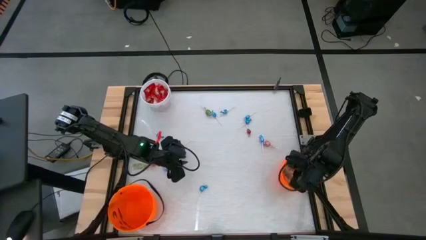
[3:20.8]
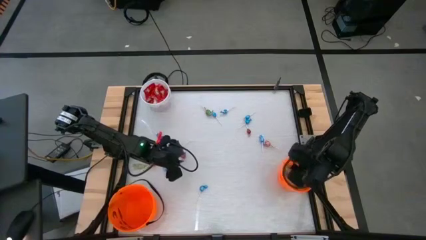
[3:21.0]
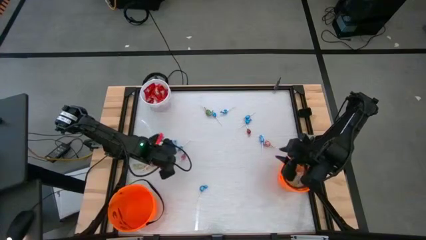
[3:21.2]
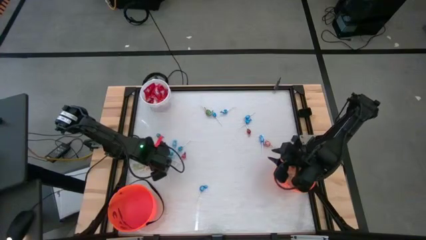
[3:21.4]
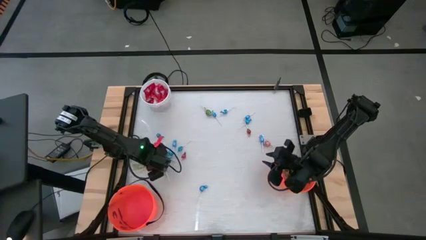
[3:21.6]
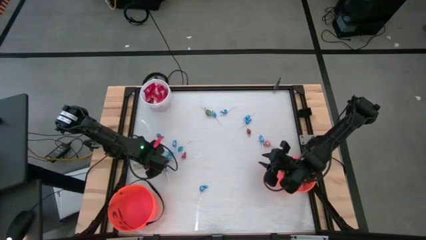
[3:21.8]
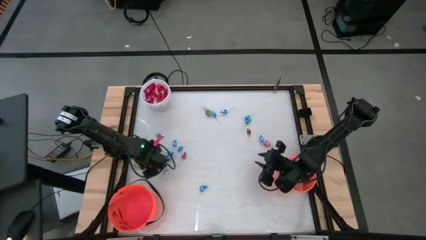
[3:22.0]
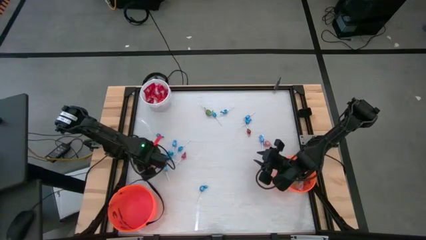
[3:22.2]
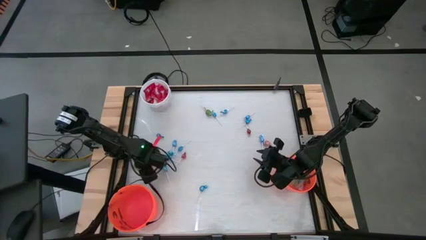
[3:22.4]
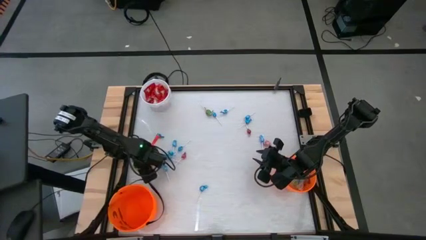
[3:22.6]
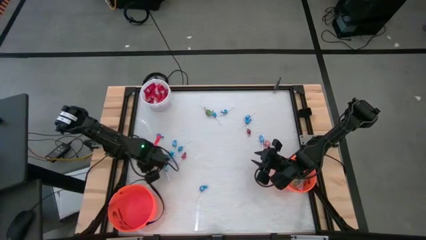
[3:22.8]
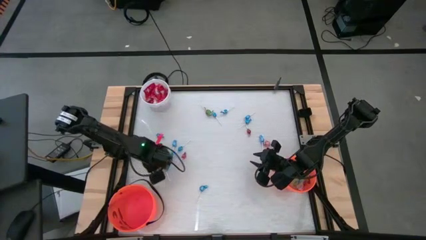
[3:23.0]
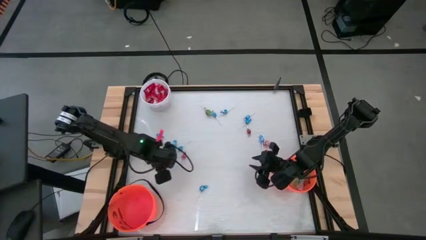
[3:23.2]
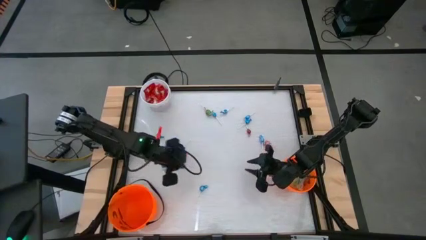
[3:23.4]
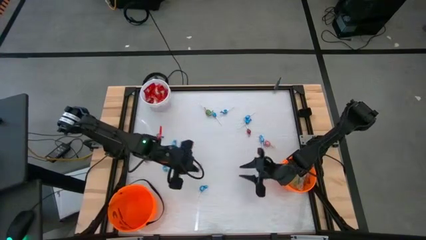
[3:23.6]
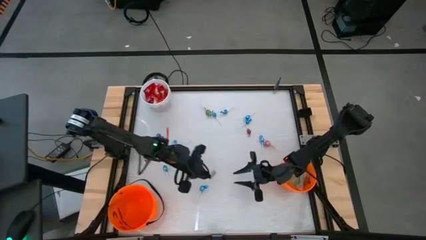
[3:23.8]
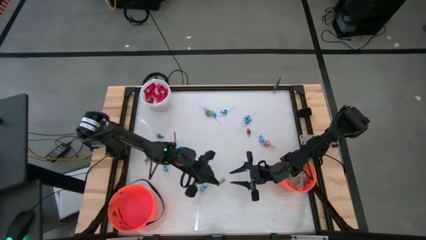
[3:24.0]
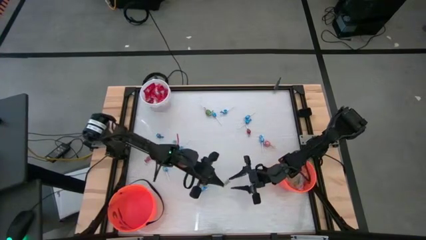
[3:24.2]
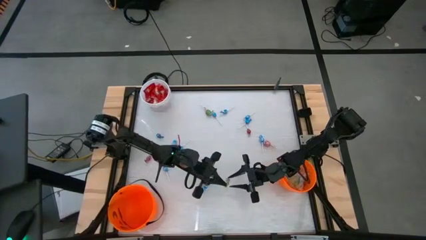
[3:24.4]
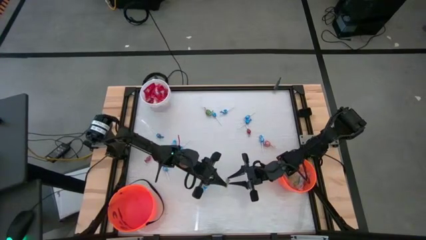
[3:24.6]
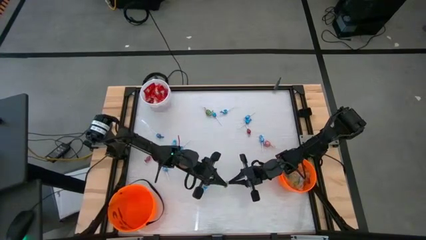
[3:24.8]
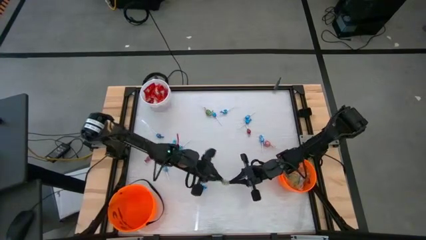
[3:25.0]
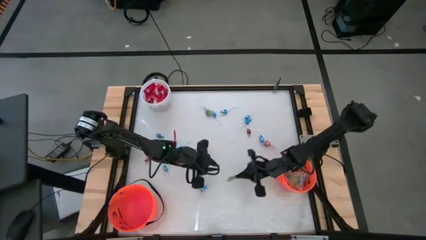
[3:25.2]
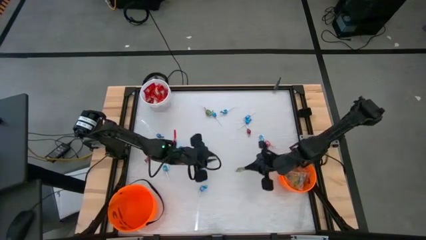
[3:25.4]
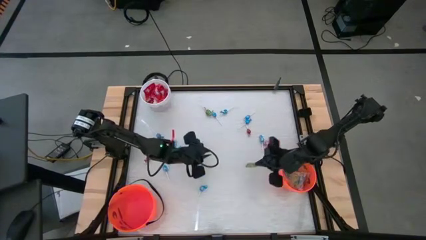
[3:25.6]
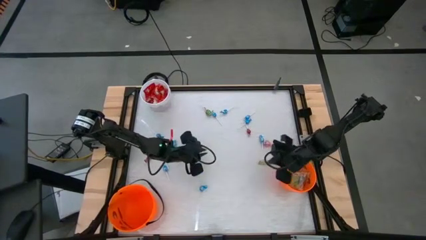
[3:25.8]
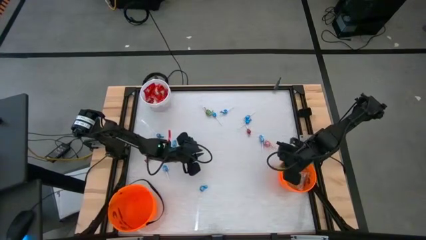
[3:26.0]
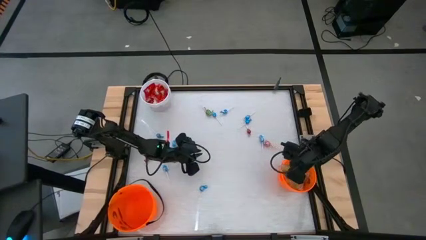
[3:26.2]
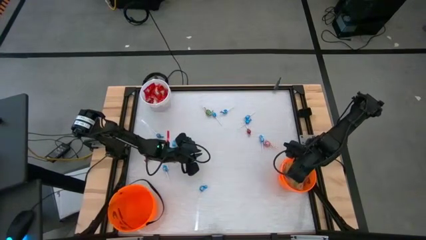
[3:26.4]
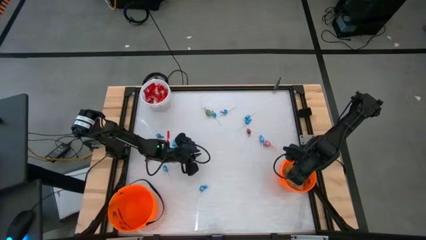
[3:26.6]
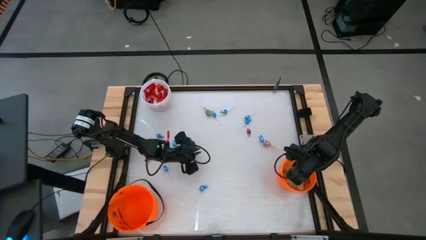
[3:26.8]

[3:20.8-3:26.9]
Task: Sort candy by brand, put in halloween buckets
Put the green candy into the right orange bucket

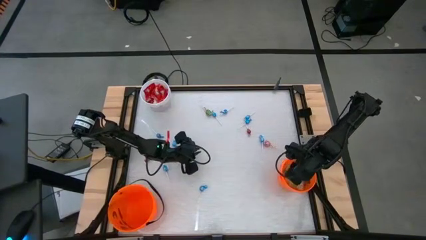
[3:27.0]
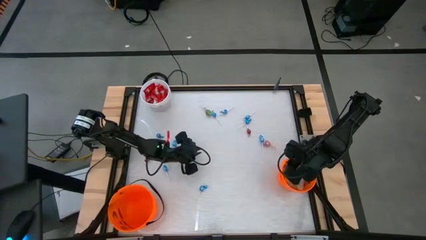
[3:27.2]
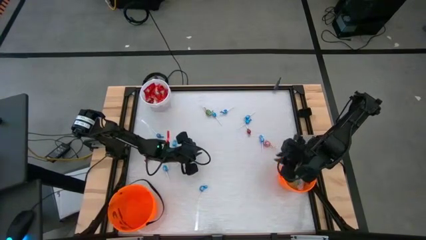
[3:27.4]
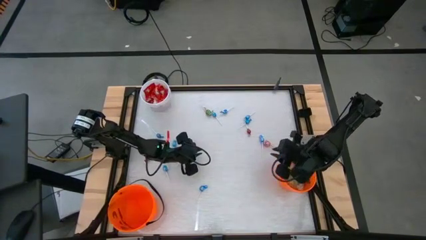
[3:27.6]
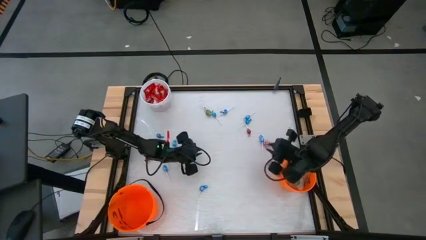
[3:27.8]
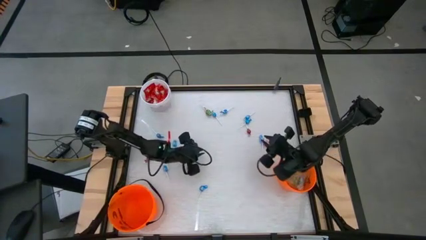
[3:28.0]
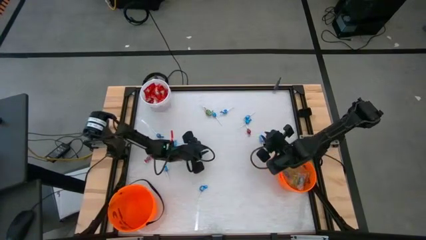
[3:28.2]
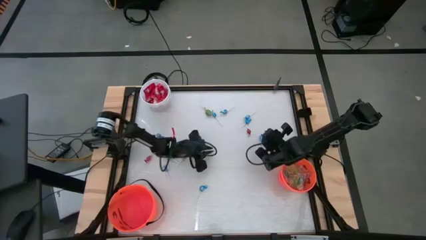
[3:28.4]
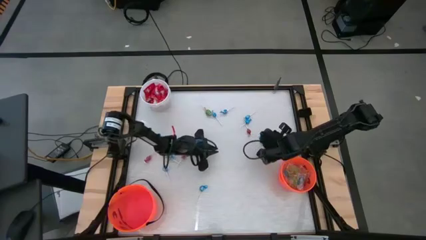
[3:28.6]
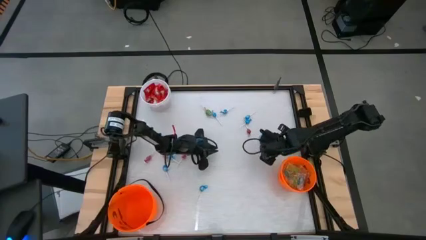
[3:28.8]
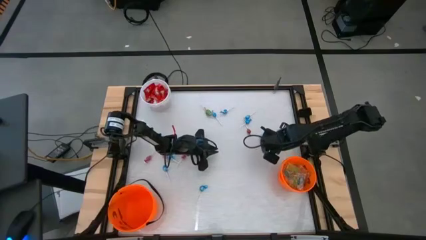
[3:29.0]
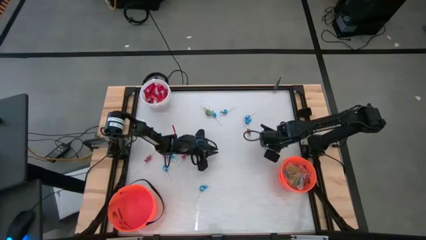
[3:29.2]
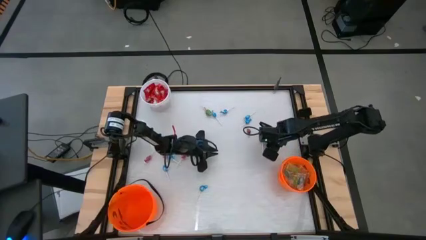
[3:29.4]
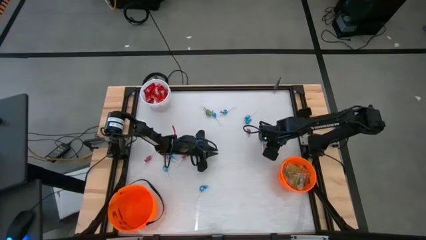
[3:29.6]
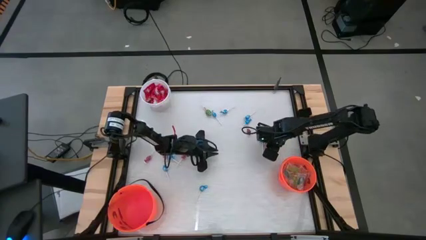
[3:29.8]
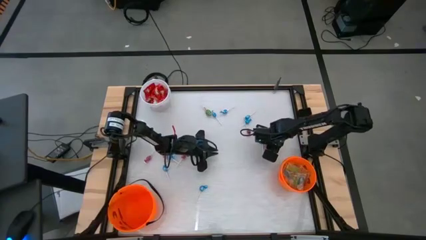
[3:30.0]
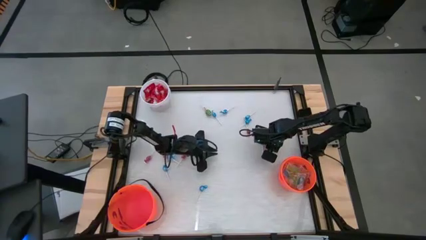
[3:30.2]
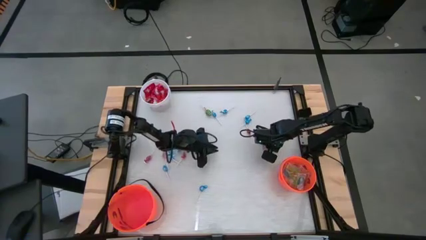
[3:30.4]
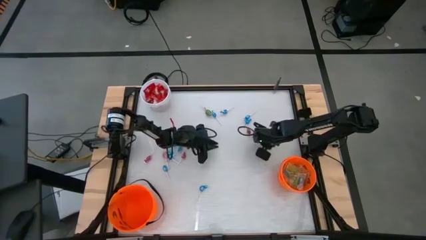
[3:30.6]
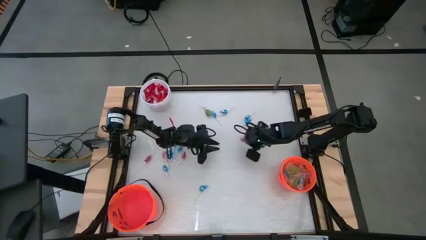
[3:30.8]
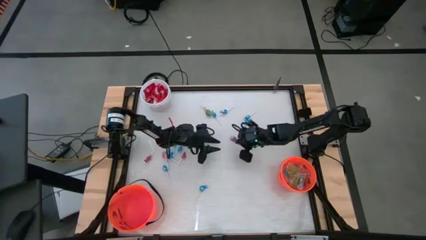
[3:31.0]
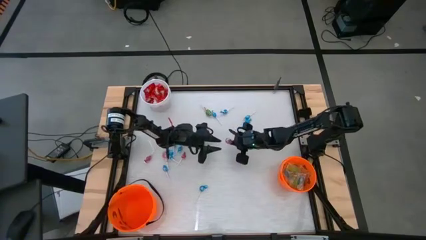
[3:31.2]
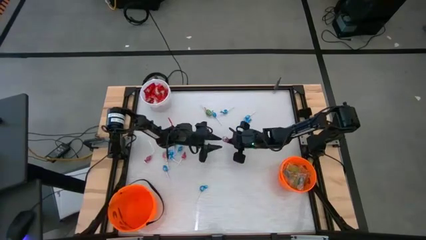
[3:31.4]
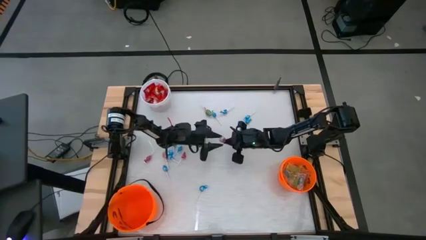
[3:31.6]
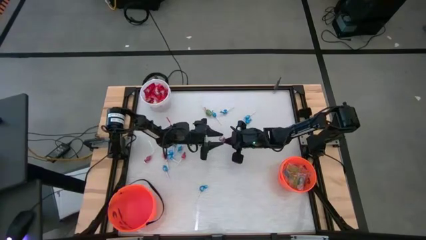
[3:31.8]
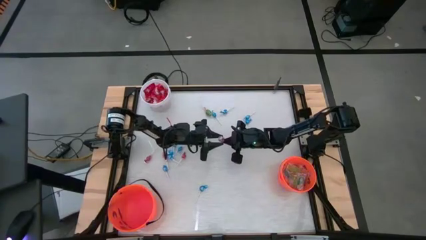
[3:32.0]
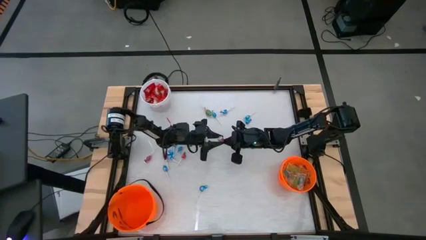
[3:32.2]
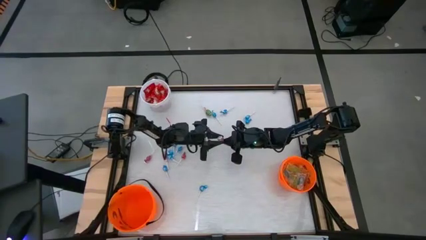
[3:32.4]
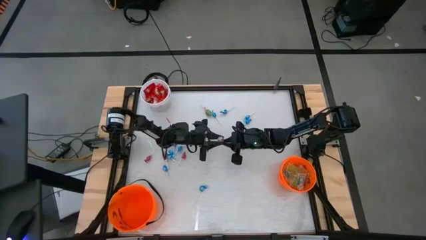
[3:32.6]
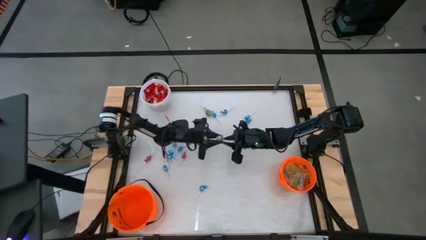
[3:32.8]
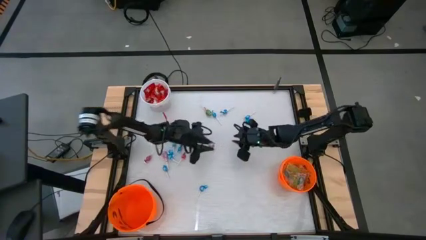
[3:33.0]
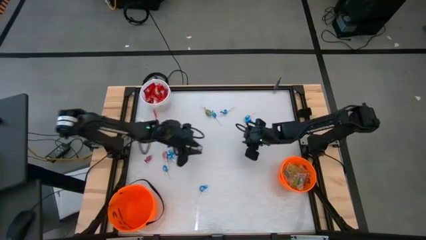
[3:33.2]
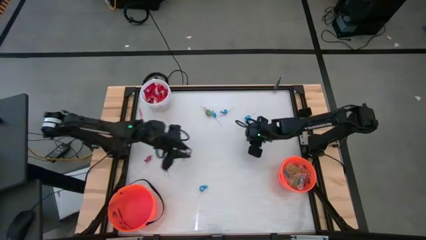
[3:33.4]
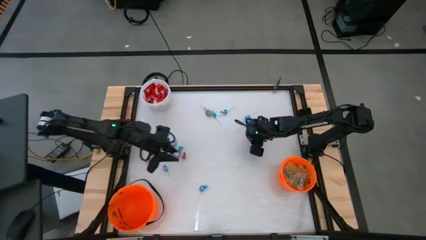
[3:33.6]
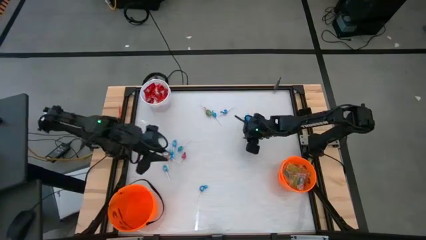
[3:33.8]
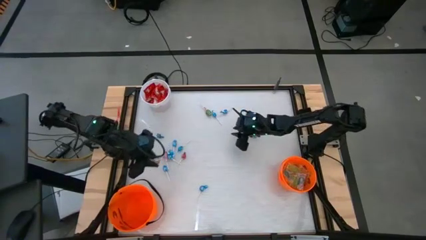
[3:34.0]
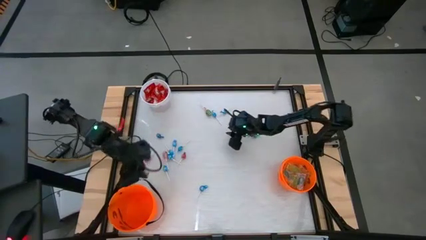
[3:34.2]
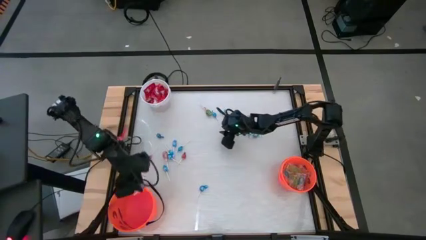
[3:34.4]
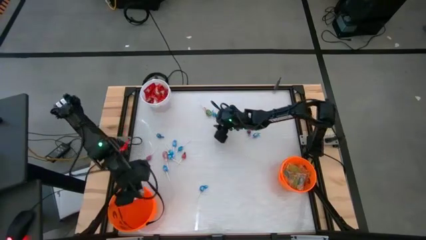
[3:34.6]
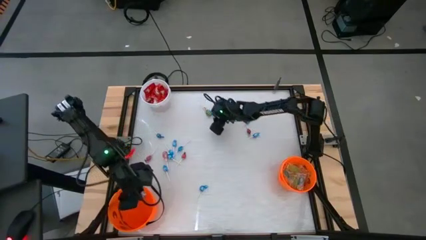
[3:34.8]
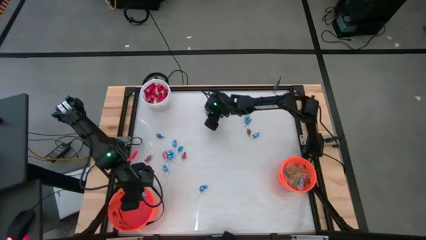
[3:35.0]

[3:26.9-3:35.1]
Put the red sucker into the left orange bucket

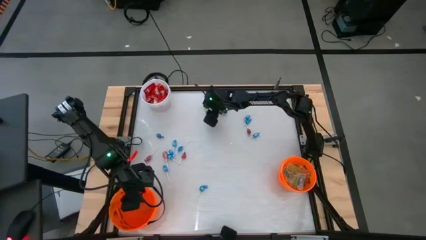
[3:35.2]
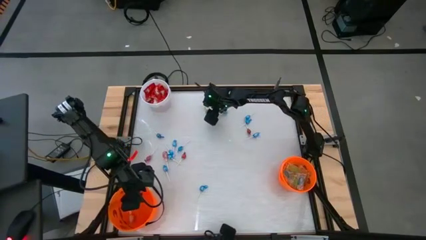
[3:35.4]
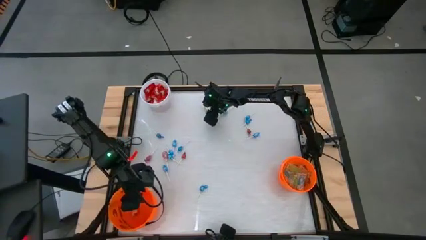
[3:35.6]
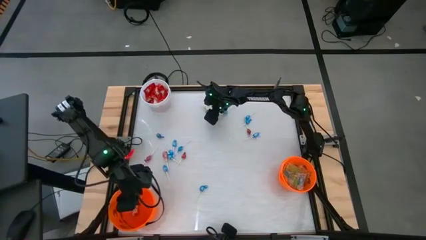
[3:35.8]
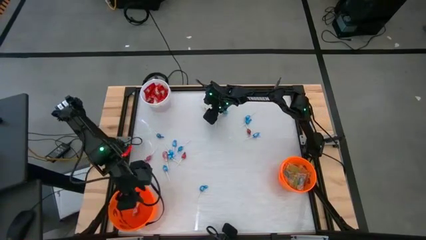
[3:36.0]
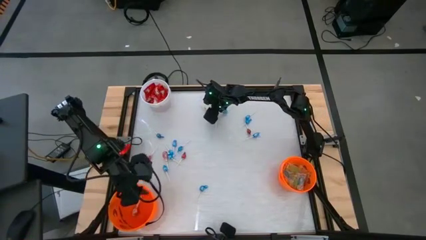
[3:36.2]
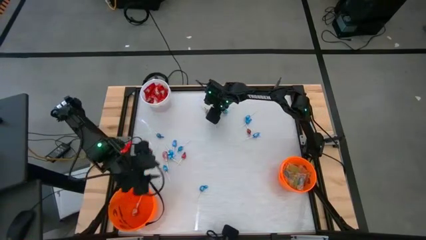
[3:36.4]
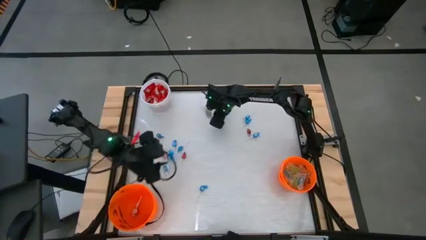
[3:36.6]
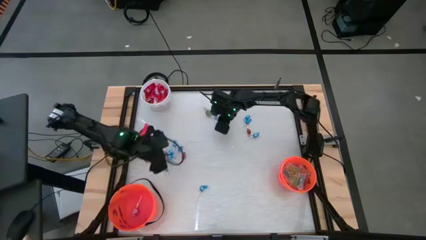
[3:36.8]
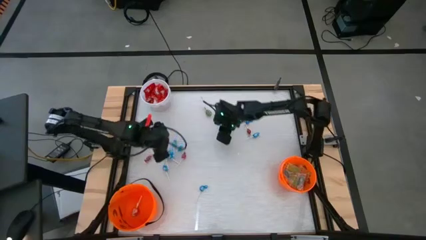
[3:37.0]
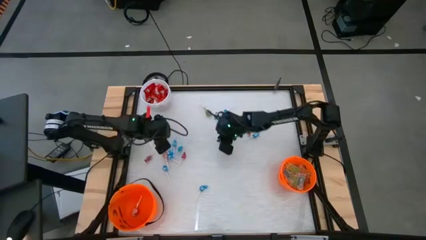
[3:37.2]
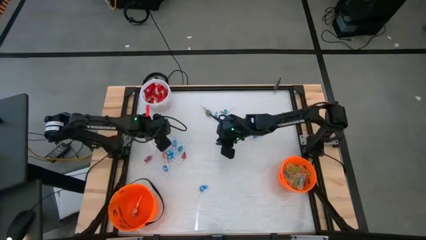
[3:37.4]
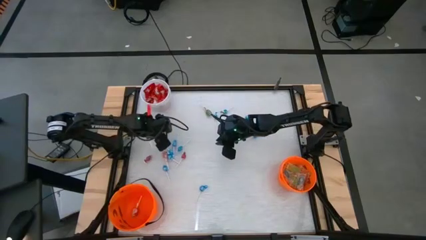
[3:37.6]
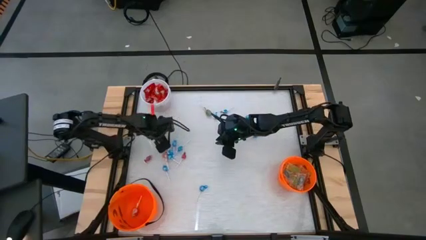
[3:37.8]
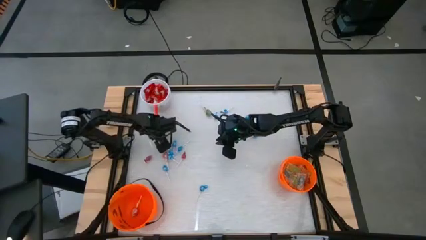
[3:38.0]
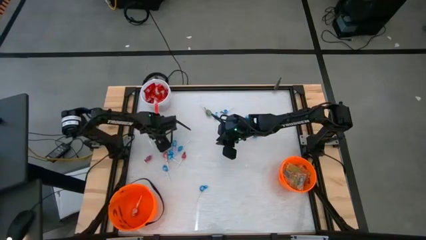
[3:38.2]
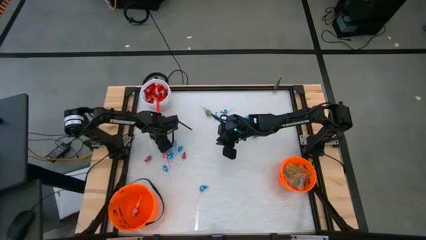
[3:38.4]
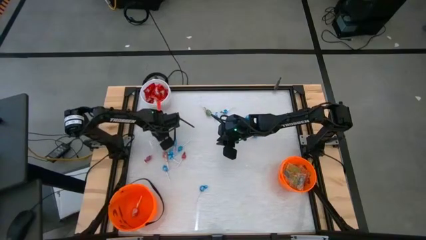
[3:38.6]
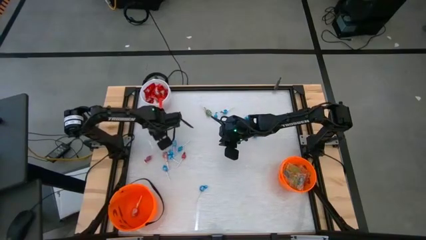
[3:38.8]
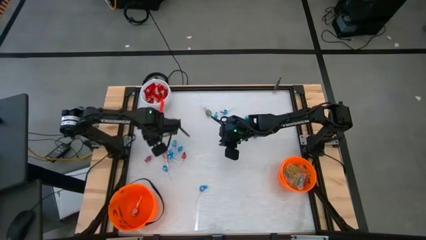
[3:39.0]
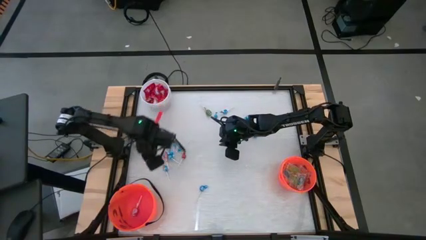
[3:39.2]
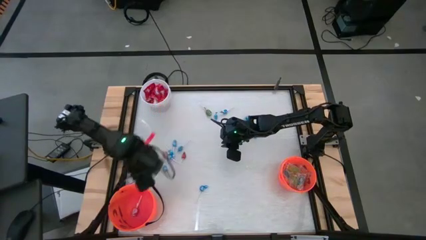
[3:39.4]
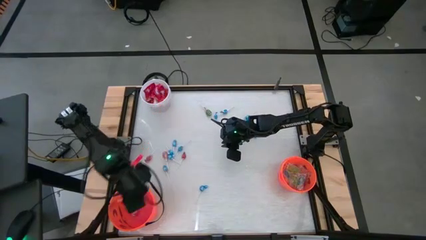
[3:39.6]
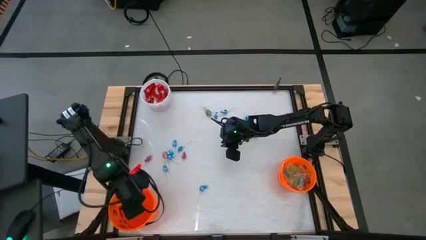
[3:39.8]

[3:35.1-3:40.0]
Put the blue sucker into the left orange bucket
